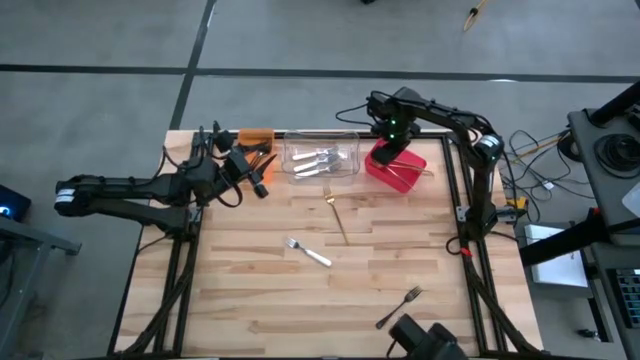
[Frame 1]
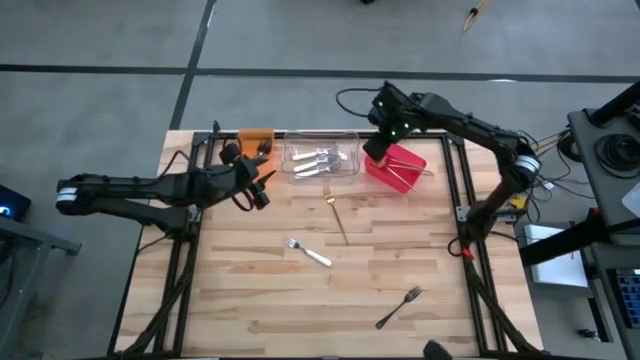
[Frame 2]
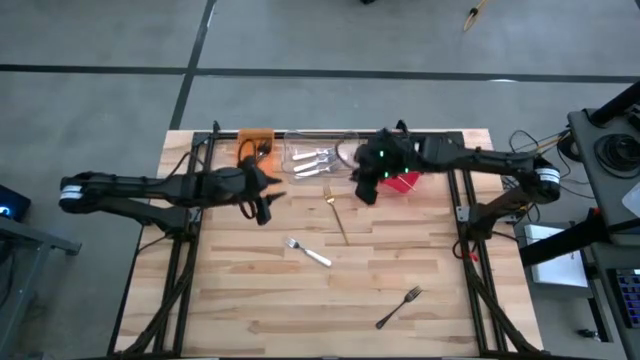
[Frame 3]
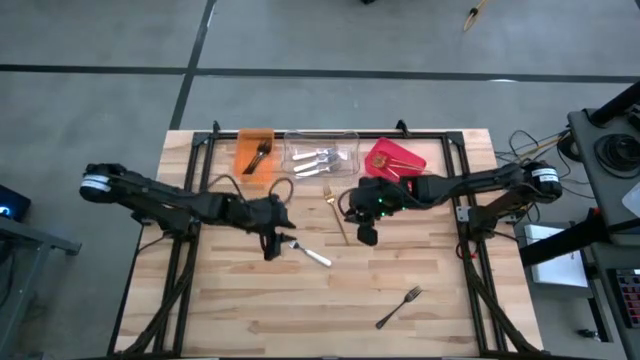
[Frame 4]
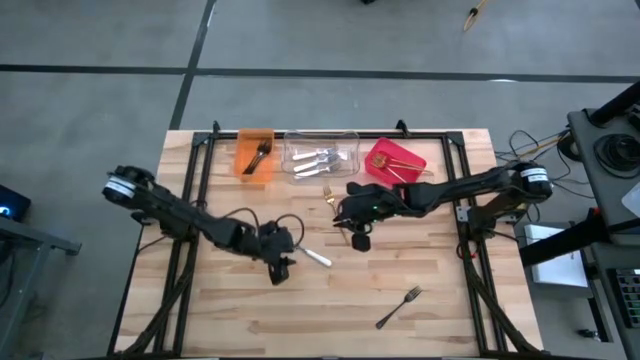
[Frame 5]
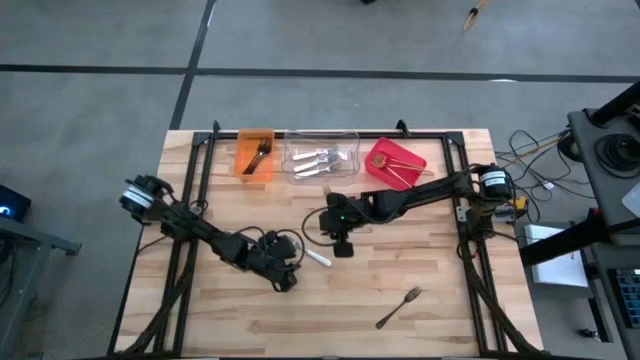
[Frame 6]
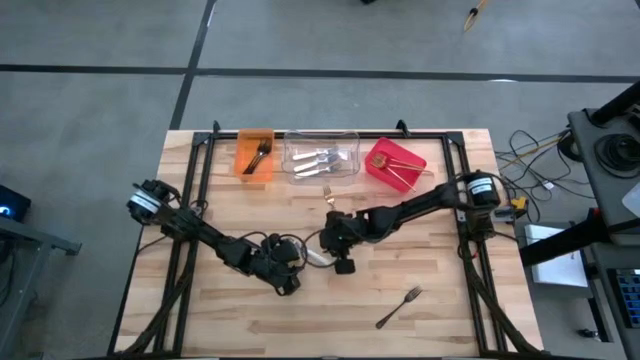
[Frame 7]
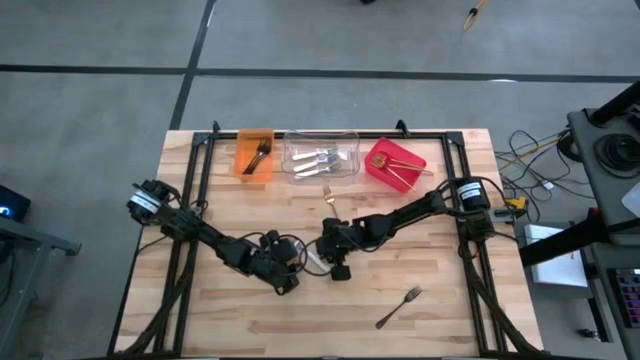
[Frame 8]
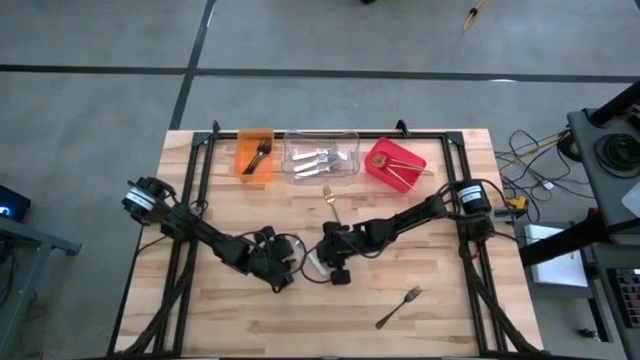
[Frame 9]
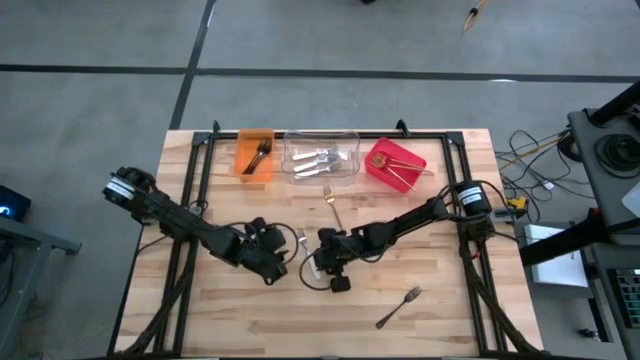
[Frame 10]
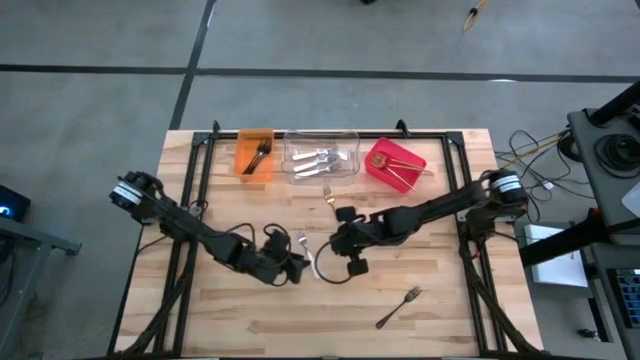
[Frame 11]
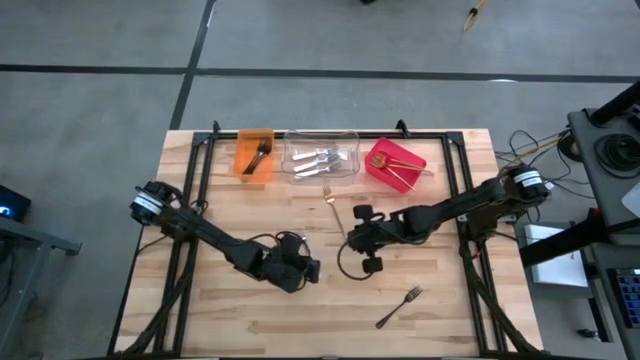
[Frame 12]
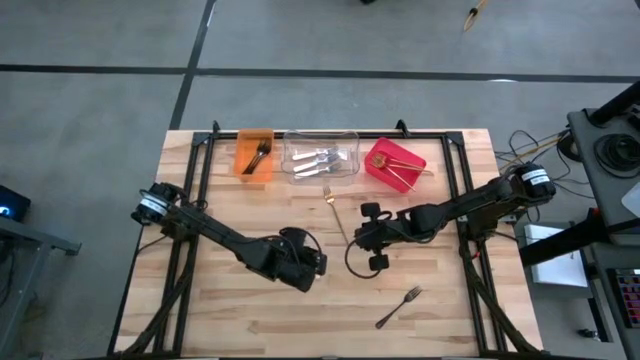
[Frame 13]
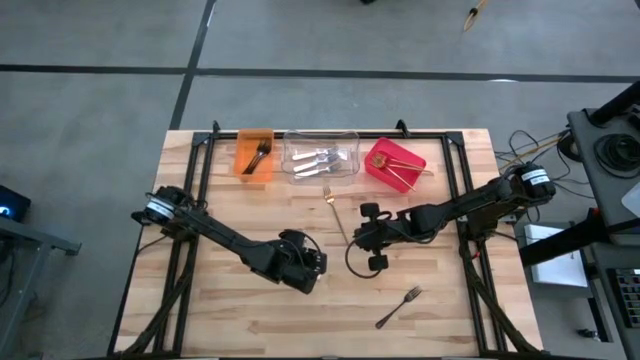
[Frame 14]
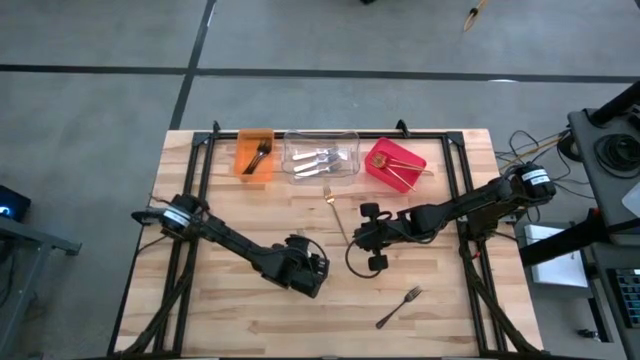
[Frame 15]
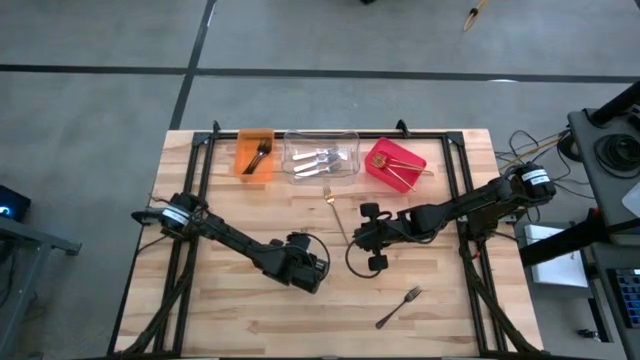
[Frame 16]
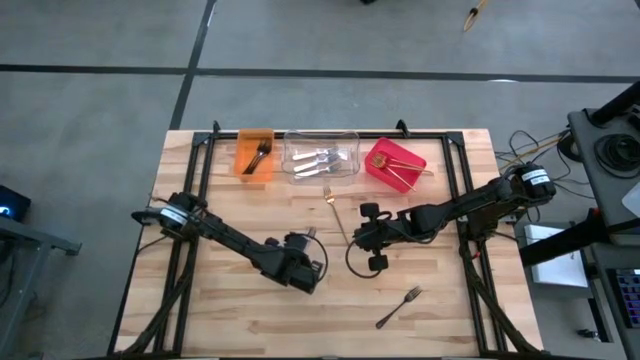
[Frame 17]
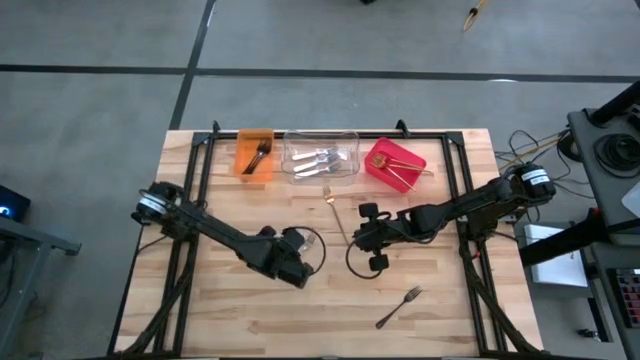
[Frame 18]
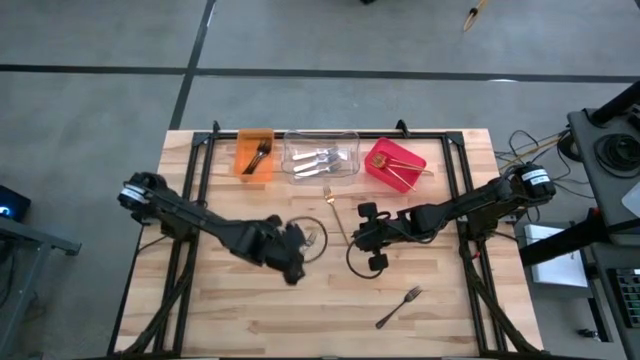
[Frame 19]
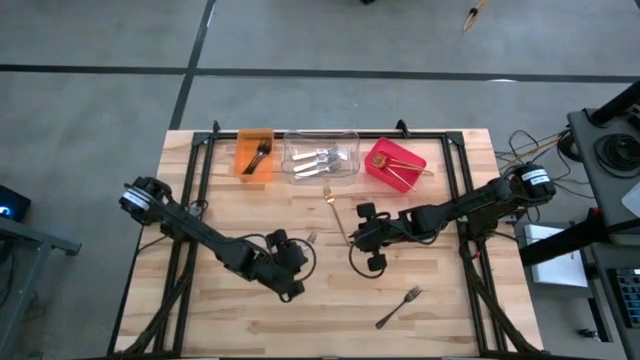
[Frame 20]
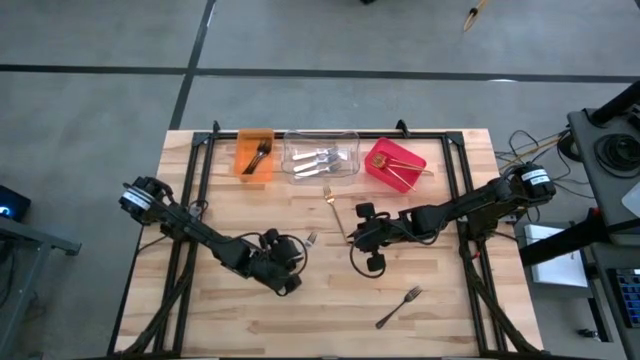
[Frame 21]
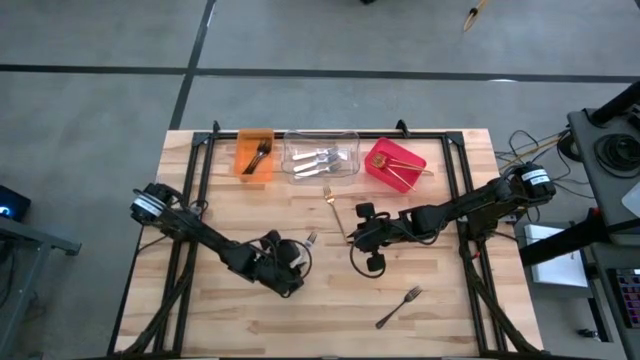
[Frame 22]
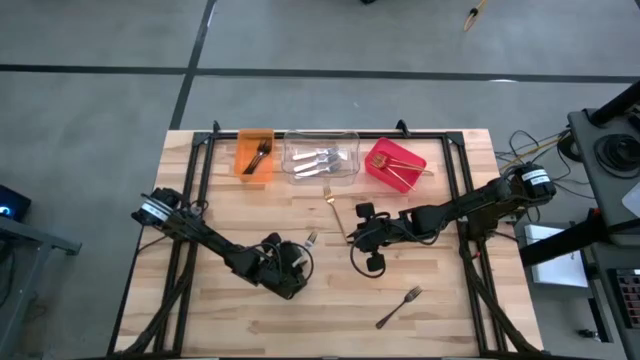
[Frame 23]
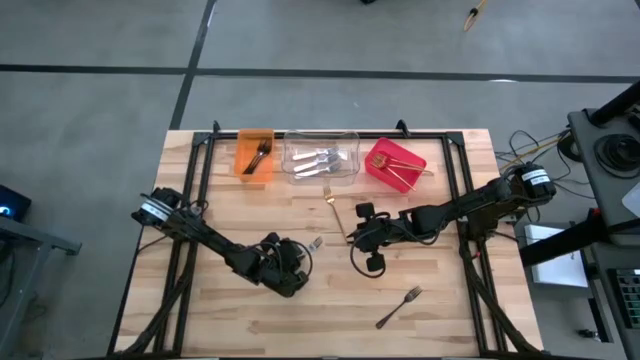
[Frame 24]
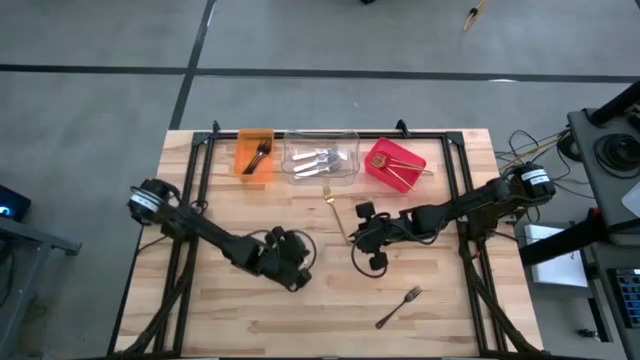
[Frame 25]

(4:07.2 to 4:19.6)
Task: Sort silverware by color (type)
Put the white fork into the transparent bin

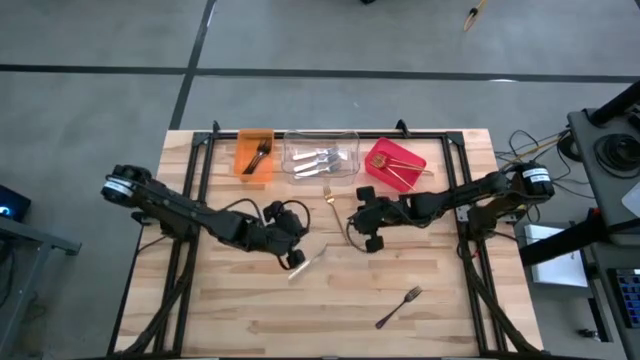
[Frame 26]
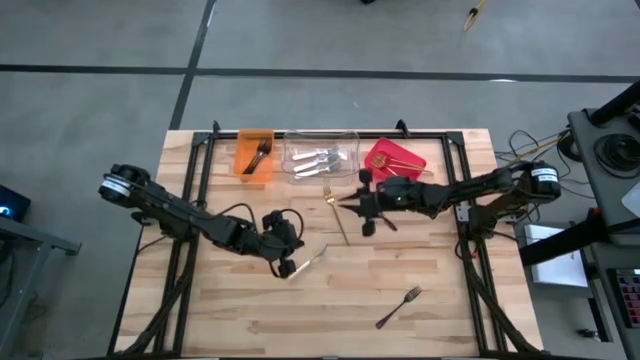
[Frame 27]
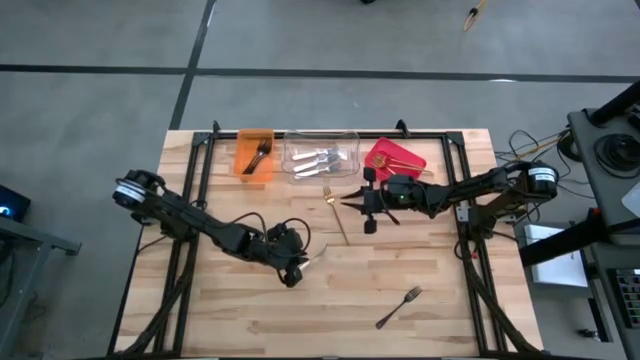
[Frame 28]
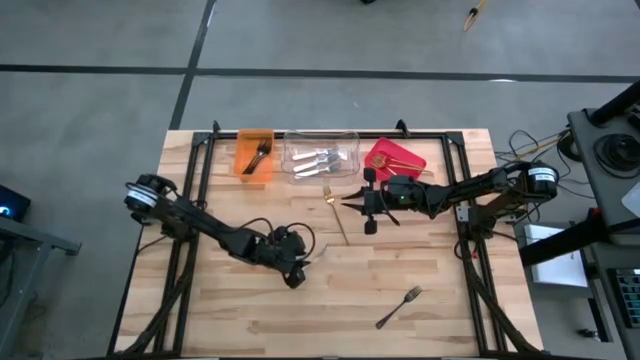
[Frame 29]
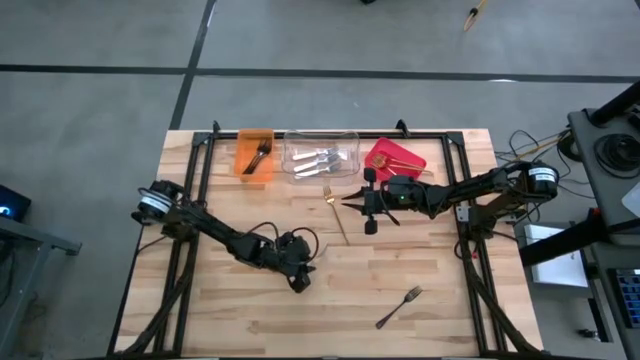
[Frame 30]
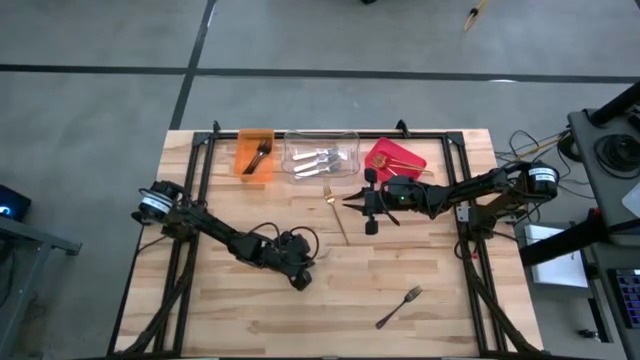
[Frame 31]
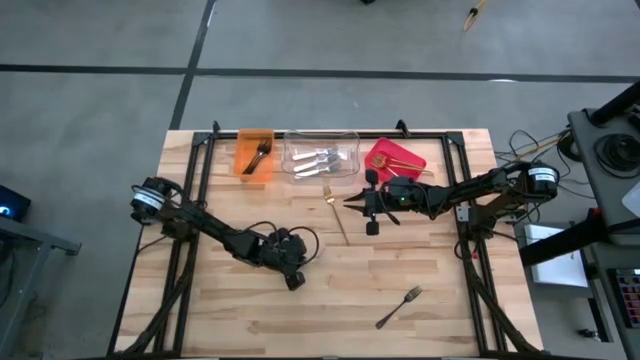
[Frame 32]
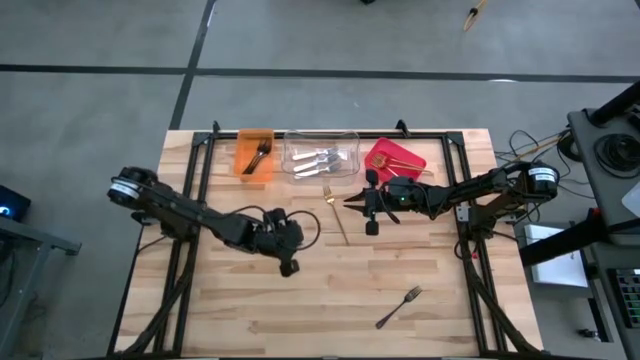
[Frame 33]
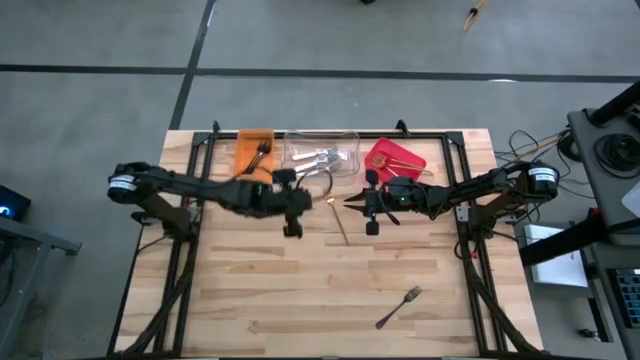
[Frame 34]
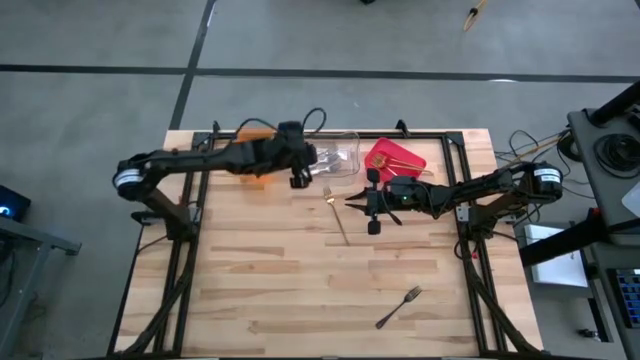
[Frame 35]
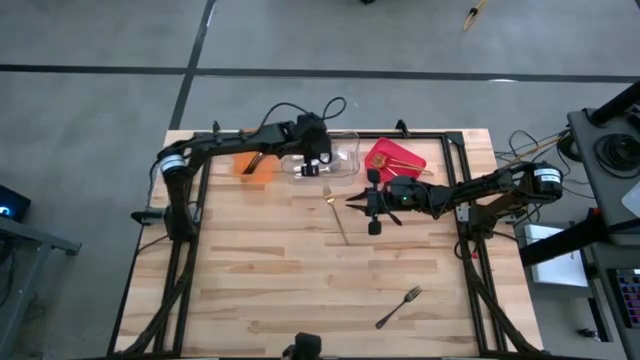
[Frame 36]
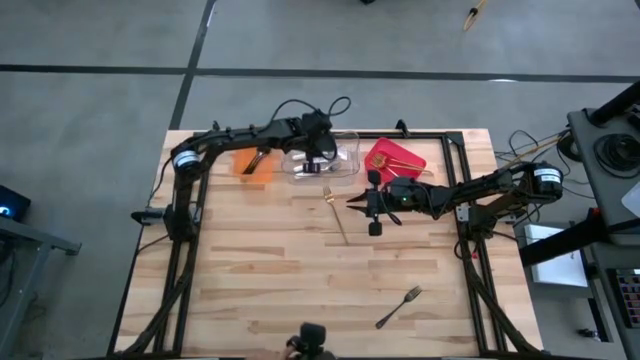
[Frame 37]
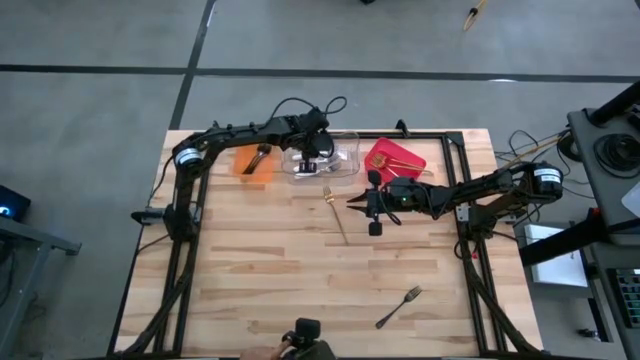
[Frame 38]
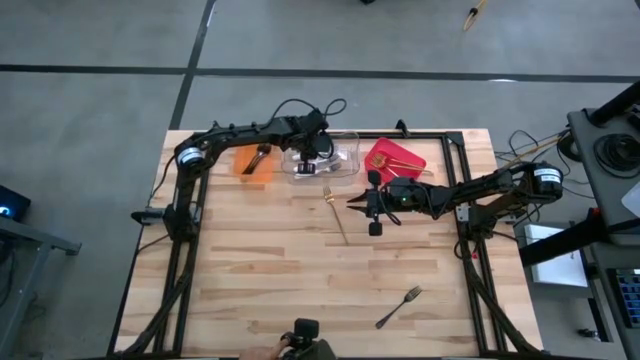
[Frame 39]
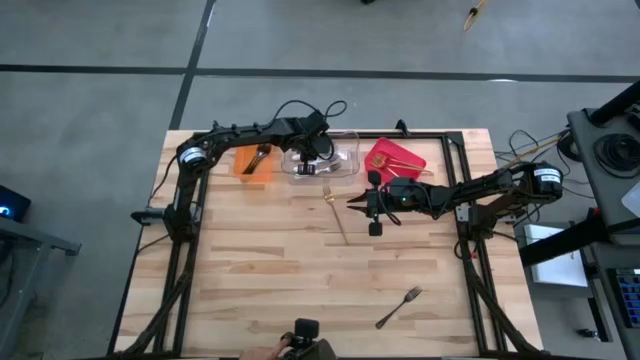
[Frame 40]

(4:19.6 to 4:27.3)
Put the white fork into the transparent bin

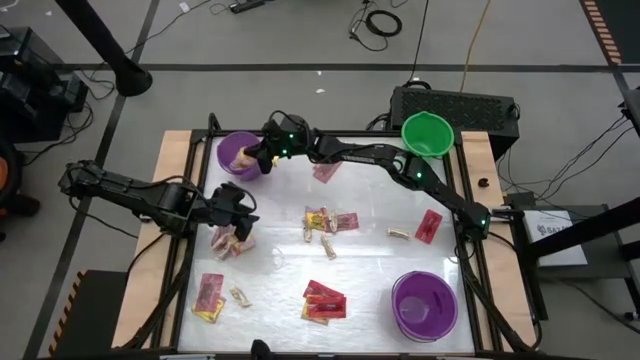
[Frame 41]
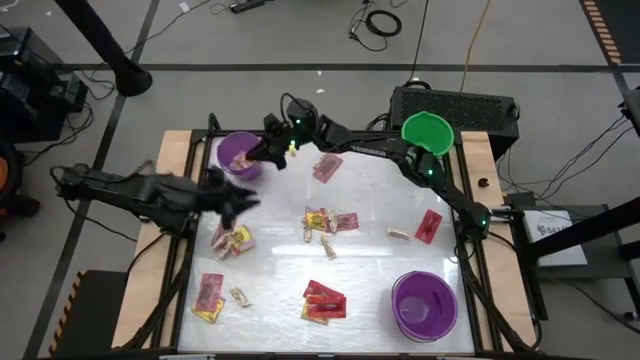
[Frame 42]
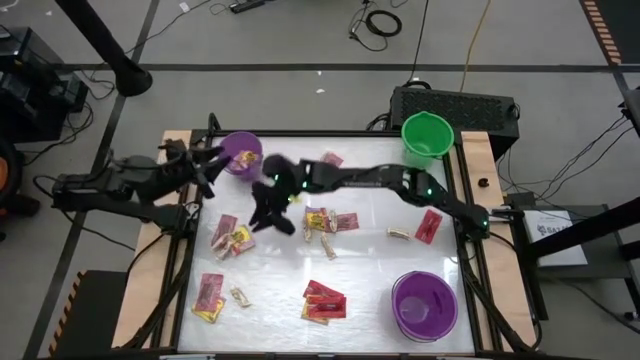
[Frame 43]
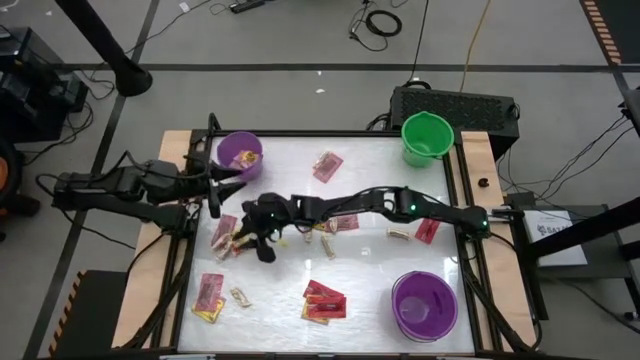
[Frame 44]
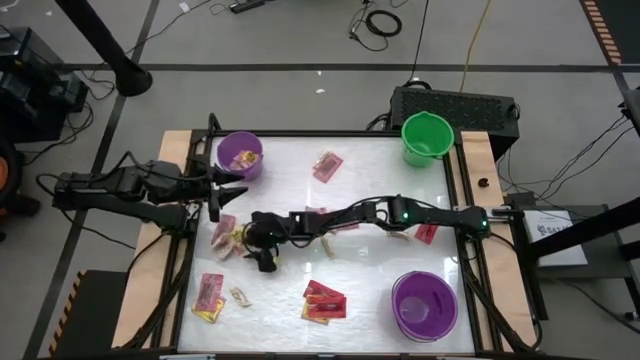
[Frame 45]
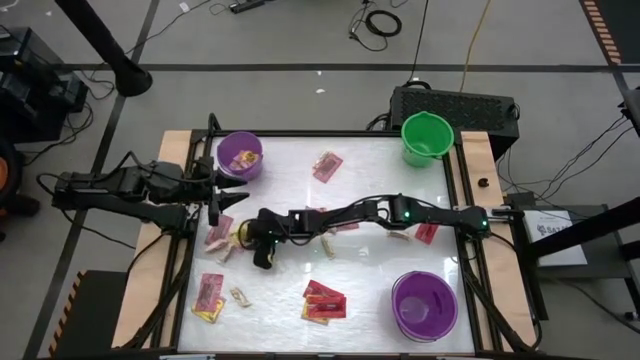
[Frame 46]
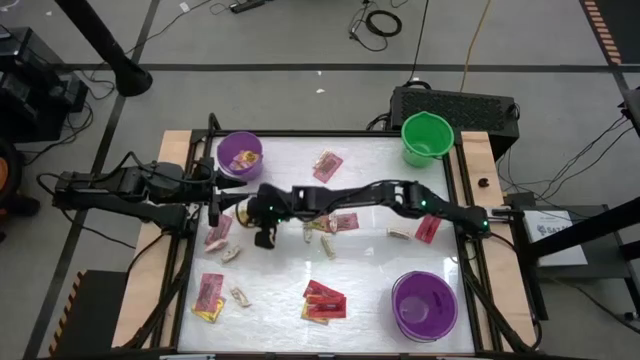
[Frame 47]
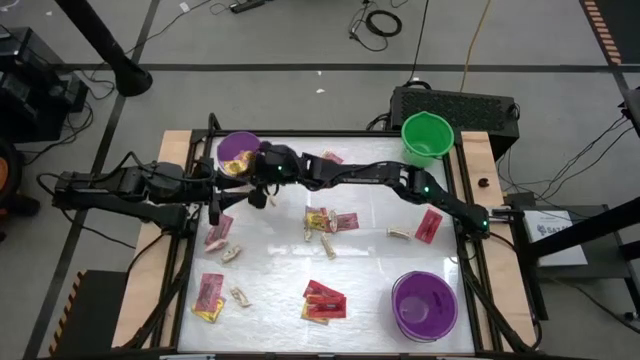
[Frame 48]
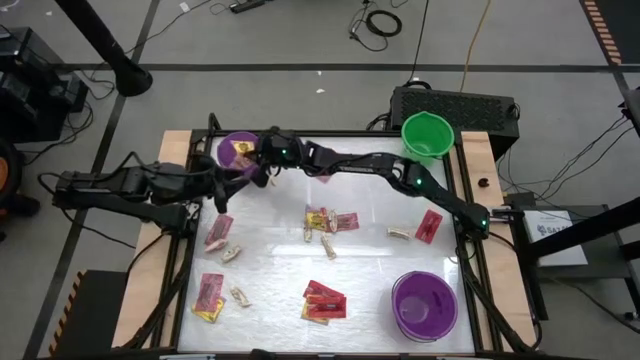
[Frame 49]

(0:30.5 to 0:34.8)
Task: Sort candy by brand, put in halloween buckets
Put the yellow candy into the top violet bucket
